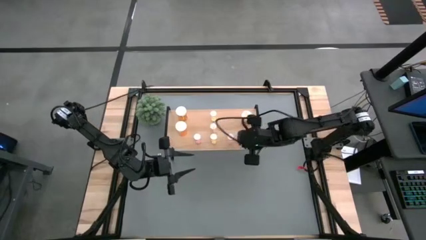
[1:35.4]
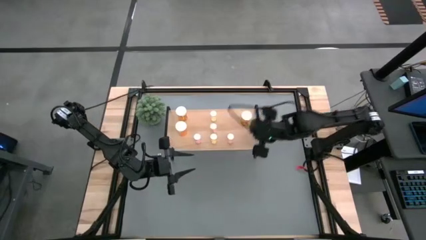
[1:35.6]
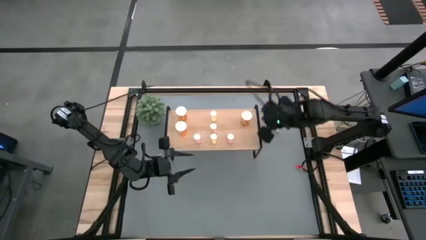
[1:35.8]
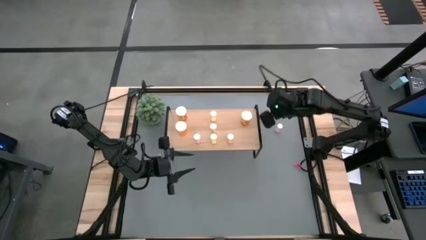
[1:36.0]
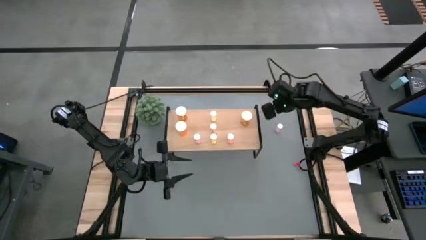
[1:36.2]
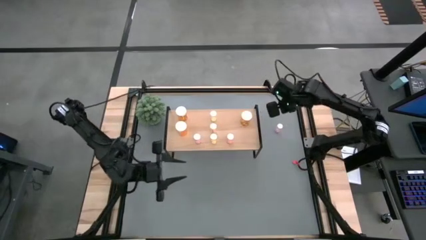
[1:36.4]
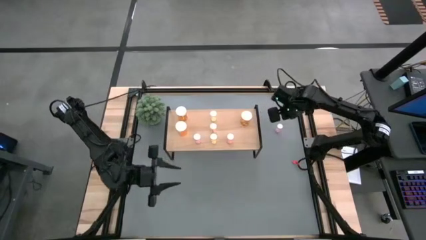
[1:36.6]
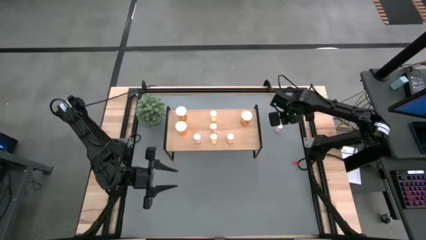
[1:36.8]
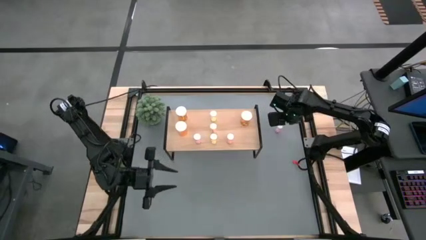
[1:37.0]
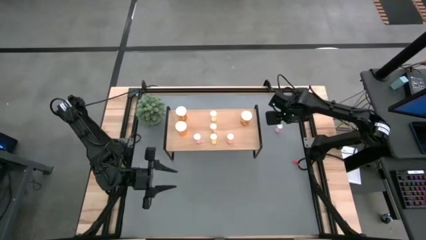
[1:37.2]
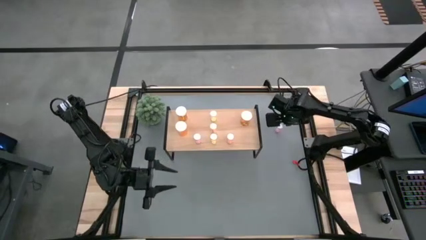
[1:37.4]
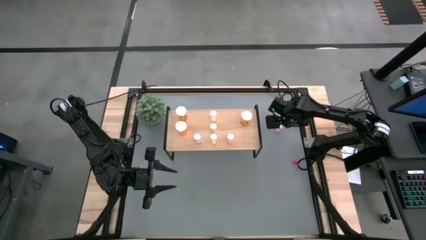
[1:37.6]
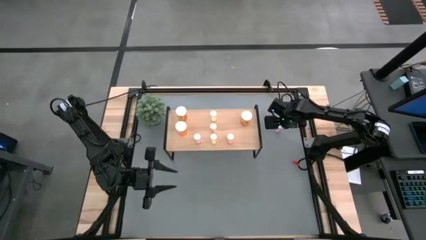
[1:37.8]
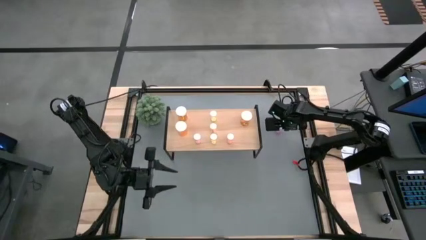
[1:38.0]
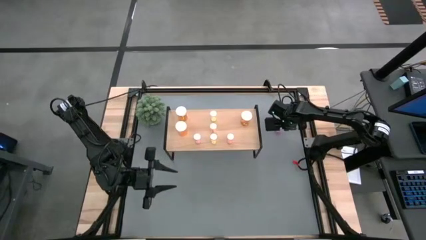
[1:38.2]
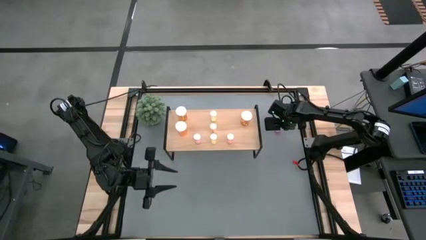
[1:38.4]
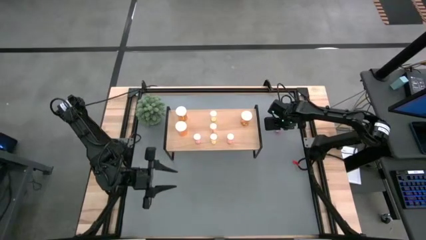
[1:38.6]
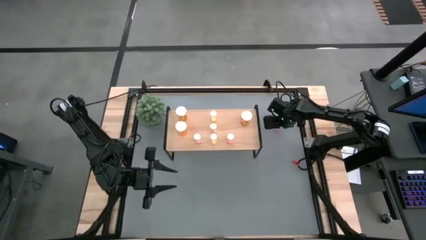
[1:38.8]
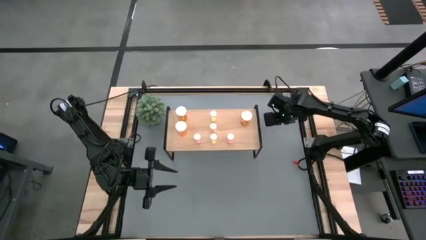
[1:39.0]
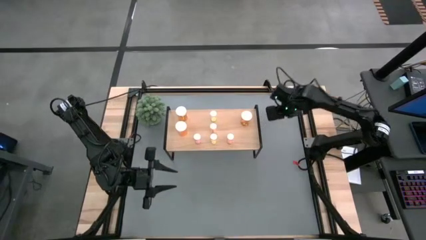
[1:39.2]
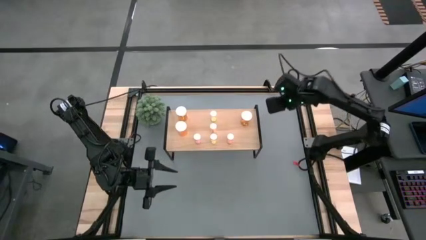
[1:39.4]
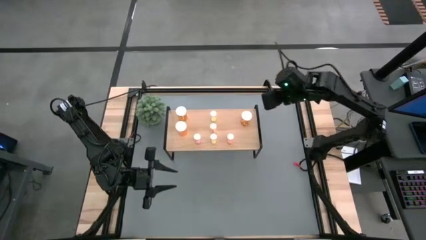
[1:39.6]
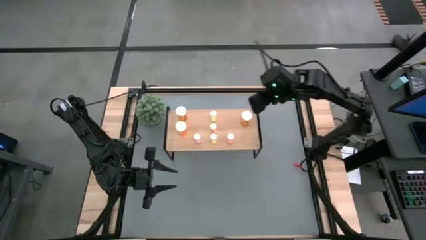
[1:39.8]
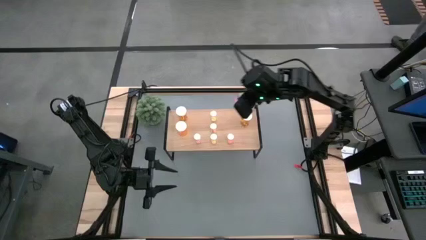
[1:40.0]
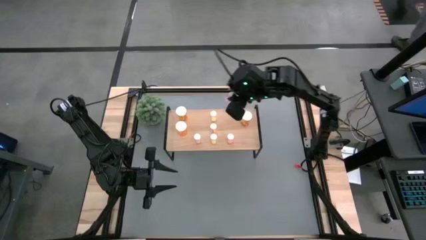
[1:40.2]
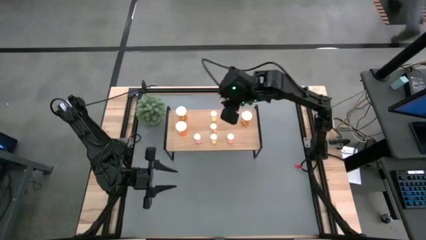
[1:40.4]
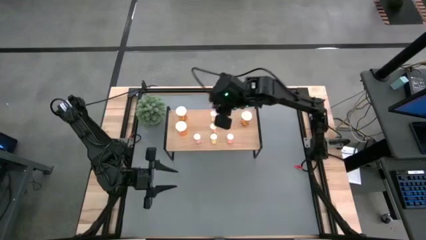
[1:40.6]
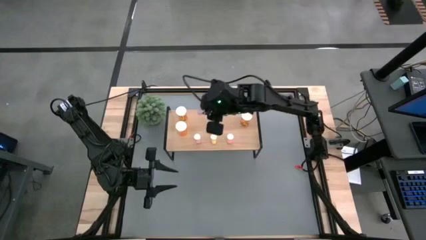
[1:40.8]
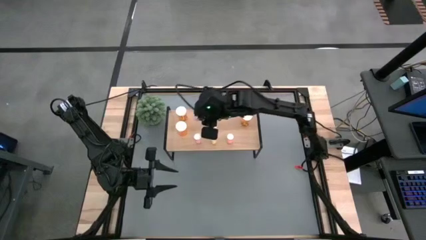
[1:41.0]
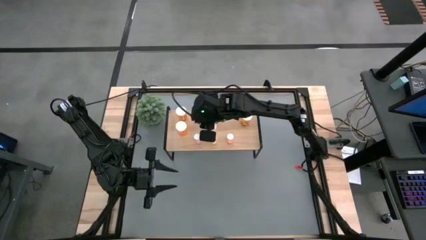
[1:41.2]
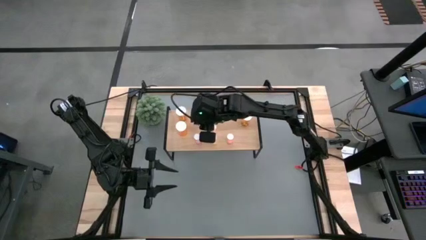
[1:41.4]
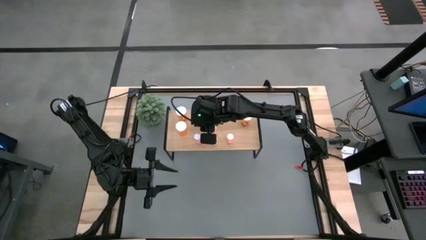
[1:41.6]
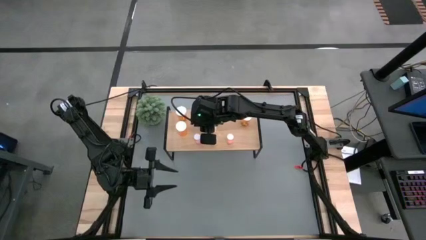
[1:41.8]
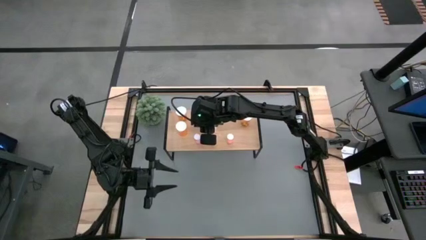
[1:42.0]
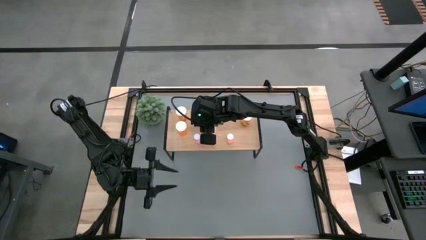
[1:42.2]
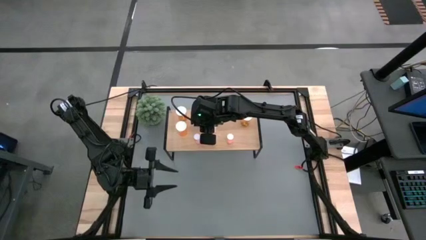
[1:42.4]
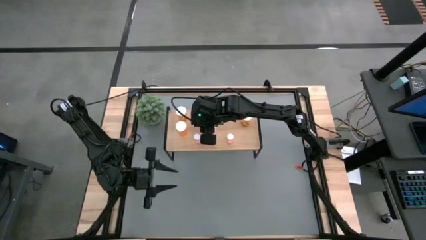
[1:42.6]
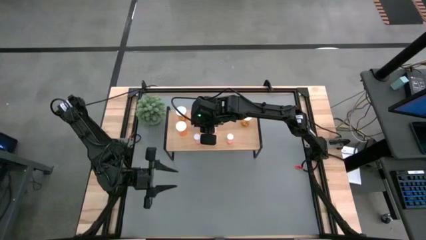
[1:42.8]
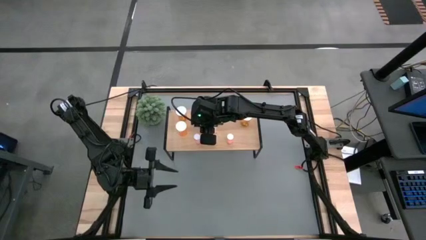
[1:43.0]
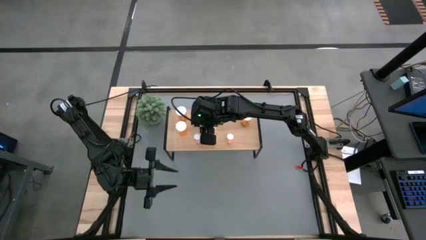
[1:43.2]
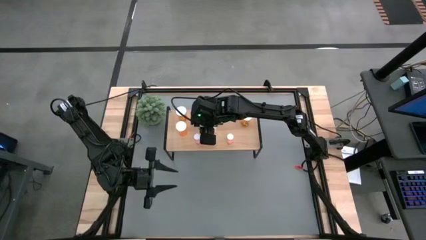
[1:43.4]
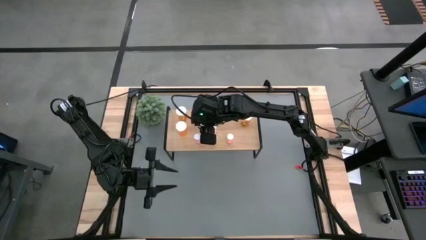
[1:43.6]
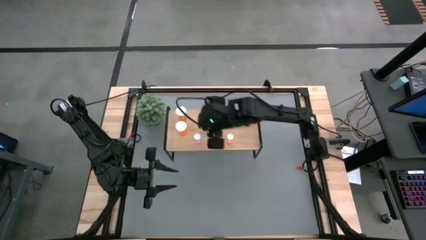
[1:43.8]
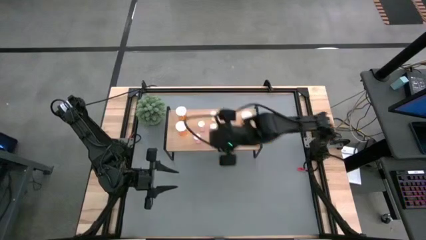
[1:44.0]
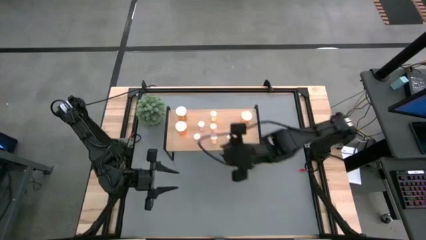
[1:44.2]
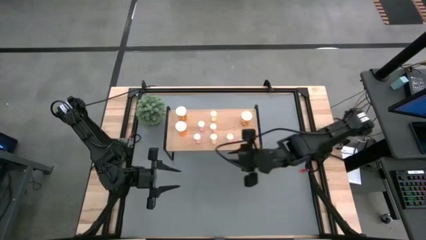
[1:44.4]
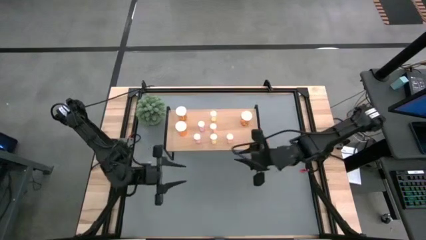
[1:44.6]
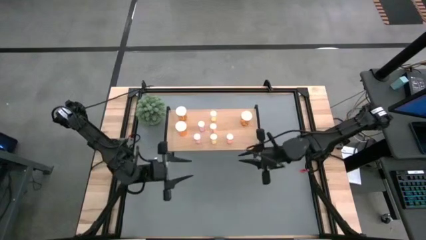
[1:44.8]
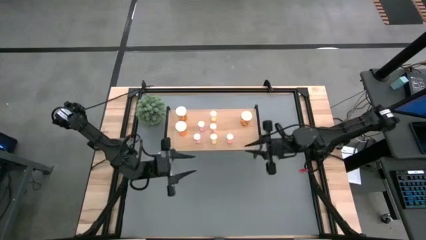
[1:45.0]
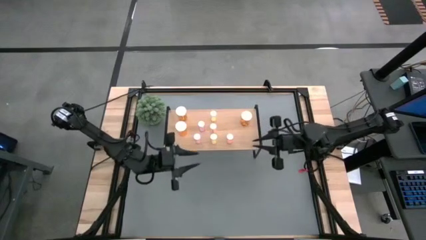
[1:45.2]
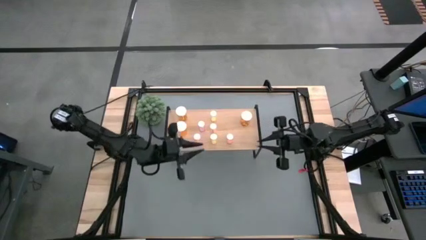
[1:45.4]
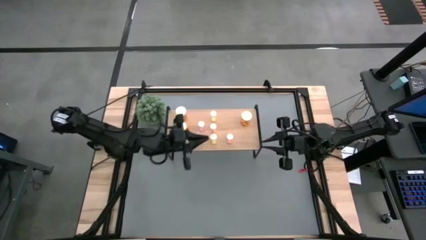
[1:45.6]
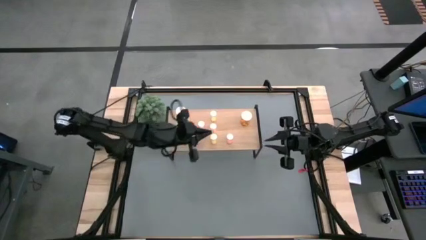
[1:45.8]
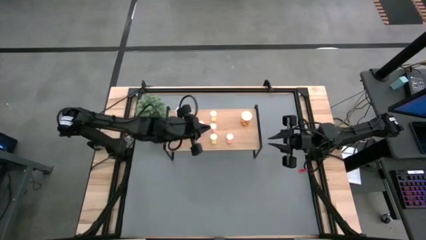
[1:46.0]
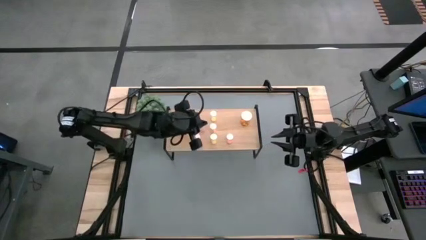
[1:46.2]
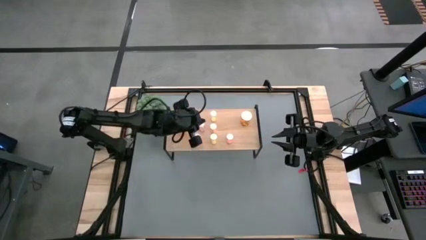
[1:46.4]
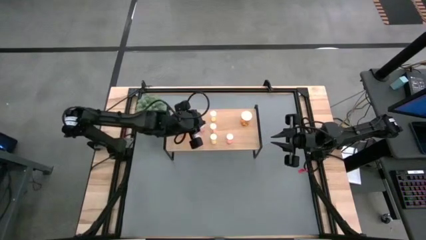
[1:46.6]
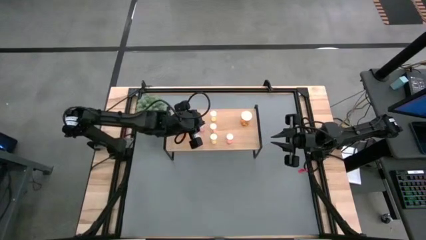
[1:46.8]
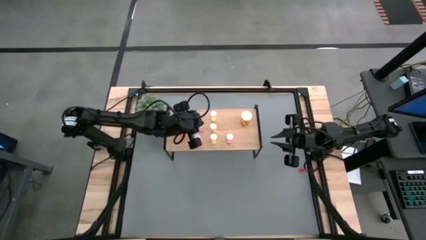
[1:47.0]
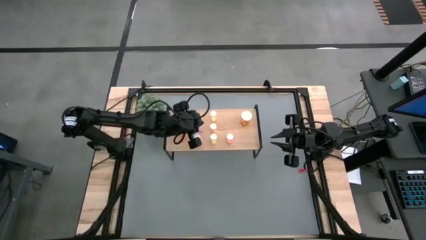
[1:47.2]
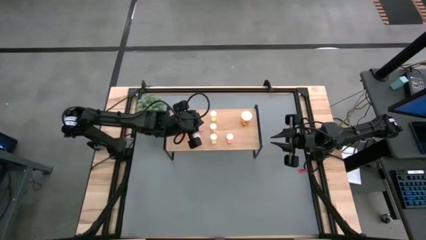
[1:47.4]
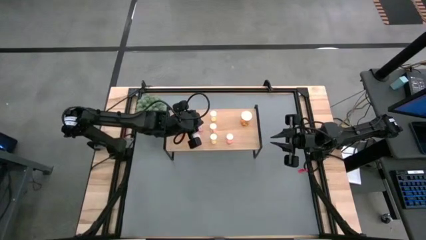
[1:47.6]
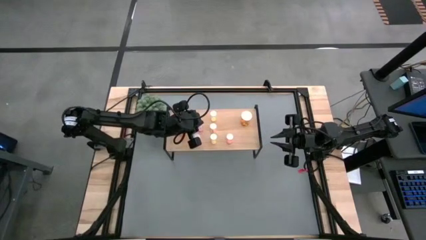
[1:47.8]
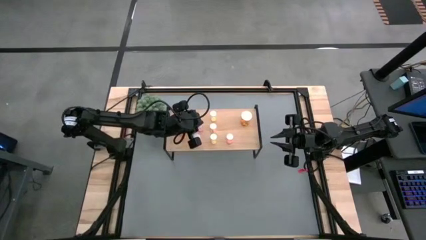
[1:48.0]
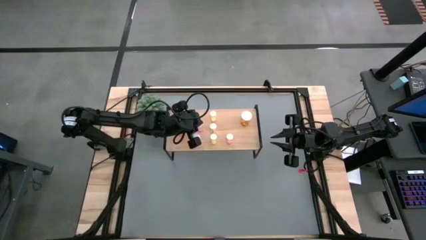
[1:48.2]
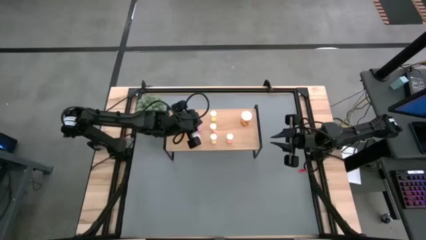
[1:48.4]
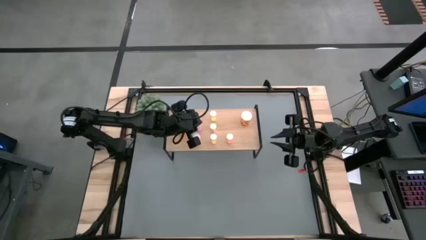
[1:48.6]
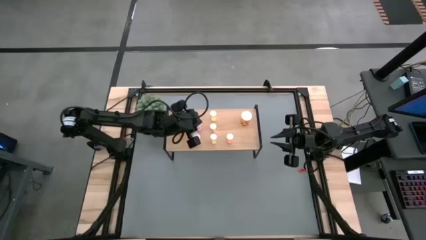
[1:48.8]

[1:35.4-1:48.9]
Task: Pick and place medicine bottles onto shelf by color
Put the purple pill bottle on the shelf aligned with the other purple pill bottle

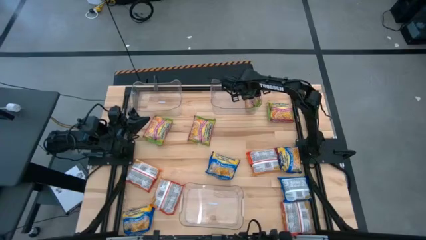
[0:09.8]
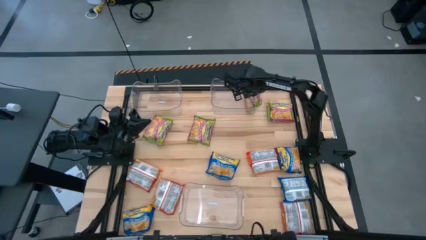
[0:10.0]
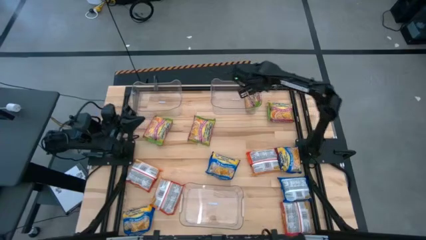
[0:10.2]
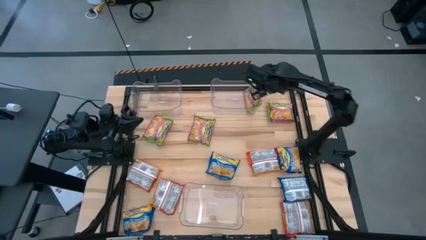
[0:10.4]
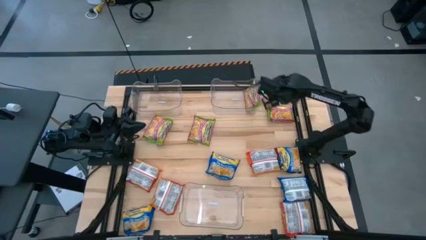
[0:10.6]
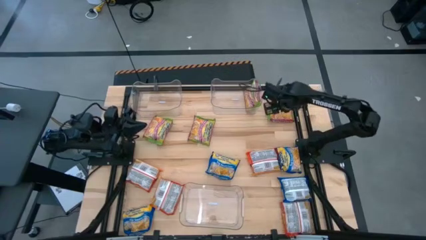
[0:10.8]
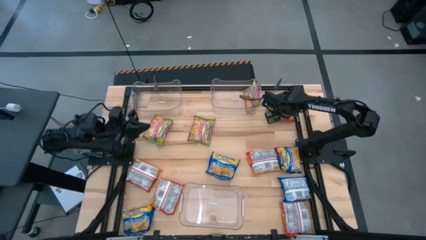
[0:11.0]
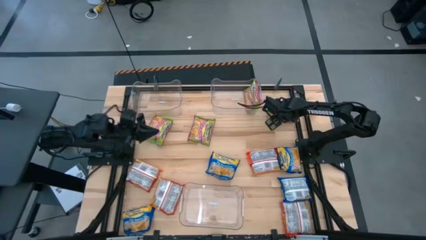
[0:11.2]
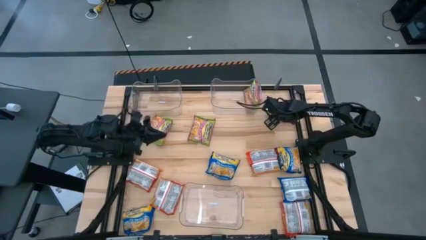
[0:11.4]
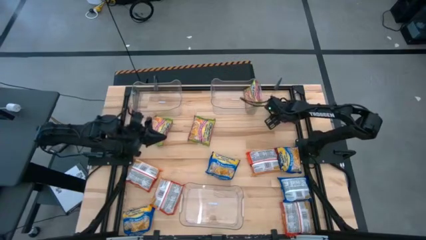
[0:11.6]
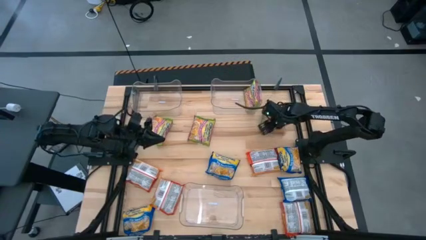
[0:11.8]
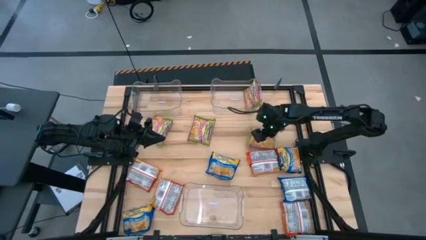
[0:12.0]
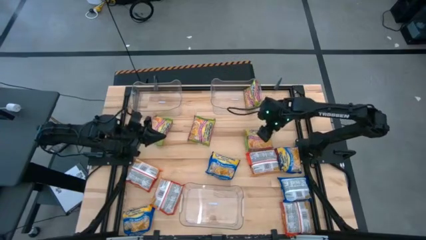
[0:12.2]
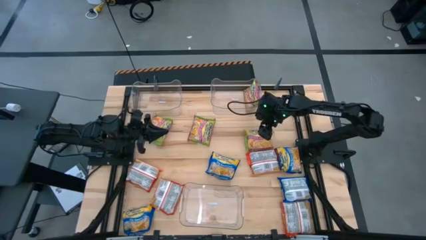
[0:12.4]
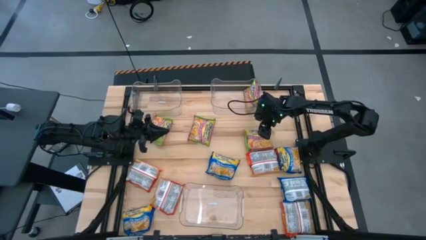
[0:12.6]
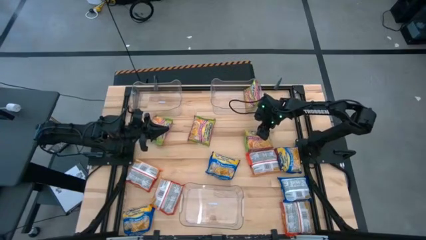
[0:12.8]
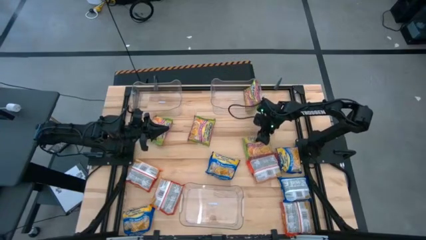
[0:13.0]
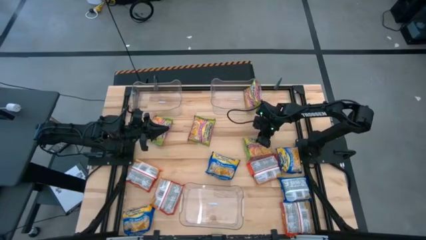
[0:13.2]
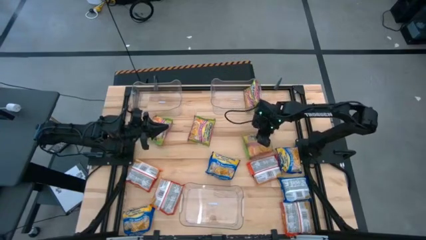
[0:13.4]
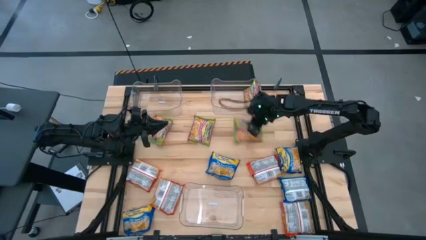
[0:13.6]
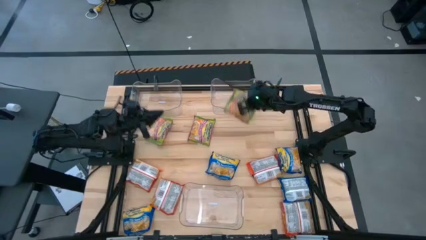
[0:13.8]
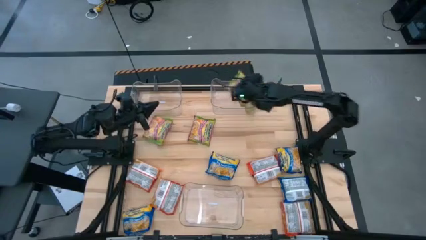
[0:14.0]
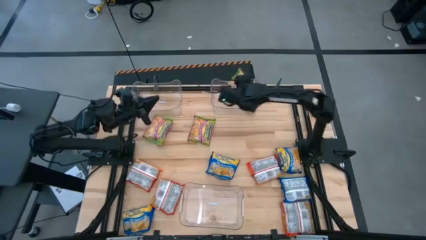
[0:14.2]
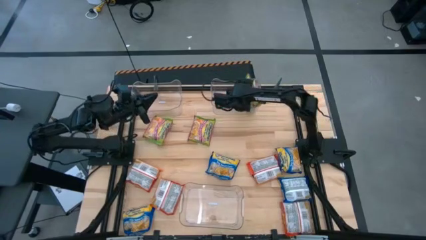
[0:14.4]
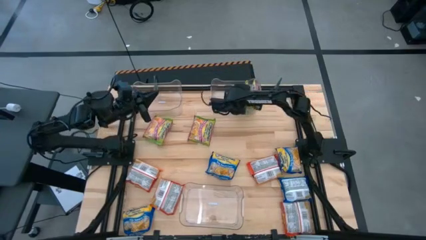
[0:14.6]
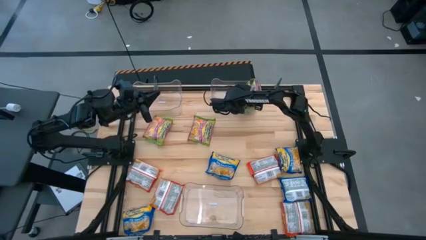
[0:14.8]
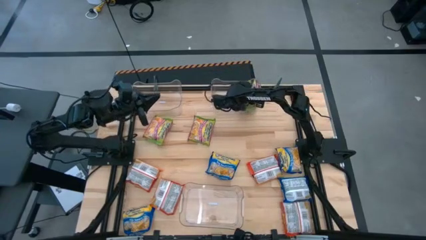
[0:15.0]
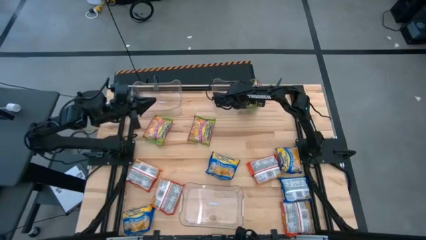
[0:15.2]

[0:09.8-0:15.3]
Task: Sort Maruchan noodles
Put the green noodle pack into the top right transparent bin
